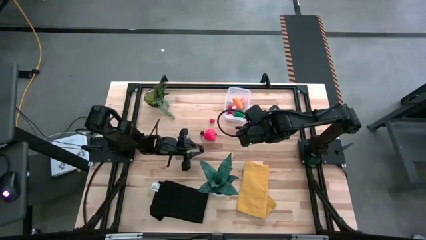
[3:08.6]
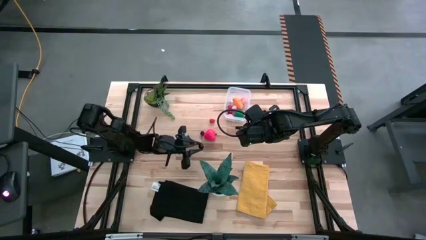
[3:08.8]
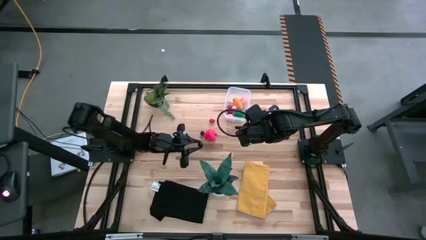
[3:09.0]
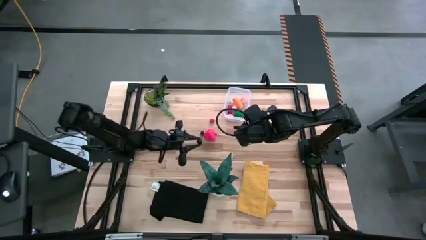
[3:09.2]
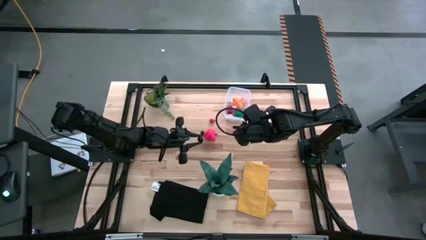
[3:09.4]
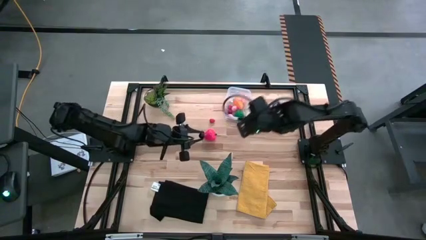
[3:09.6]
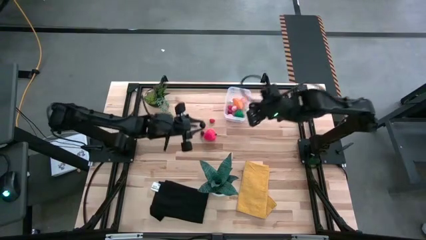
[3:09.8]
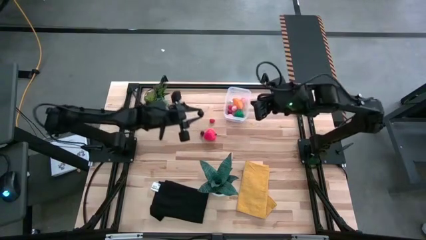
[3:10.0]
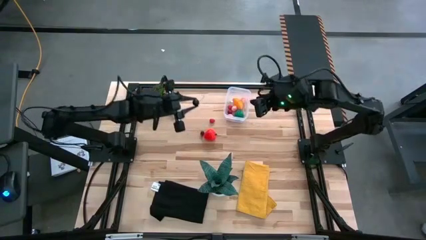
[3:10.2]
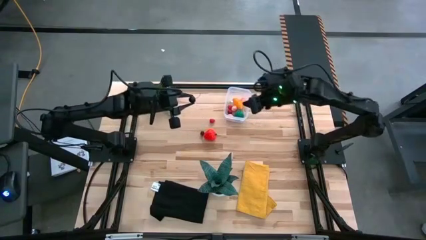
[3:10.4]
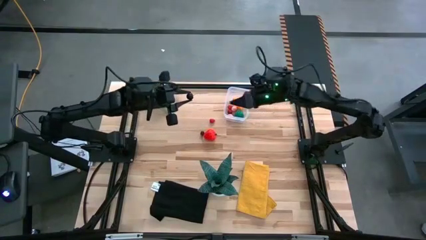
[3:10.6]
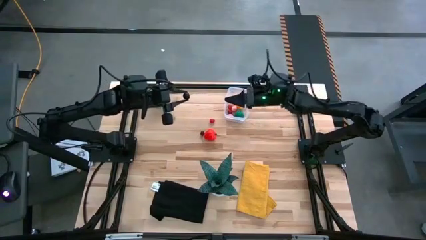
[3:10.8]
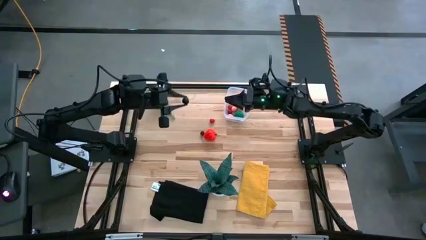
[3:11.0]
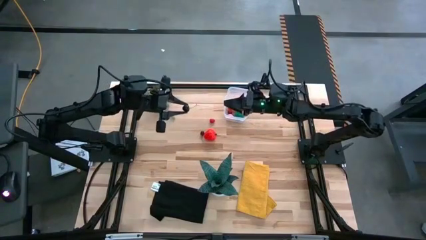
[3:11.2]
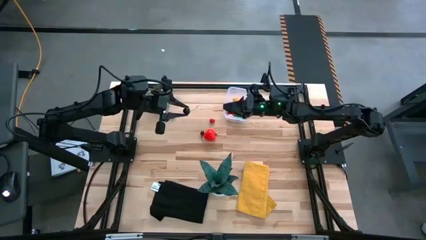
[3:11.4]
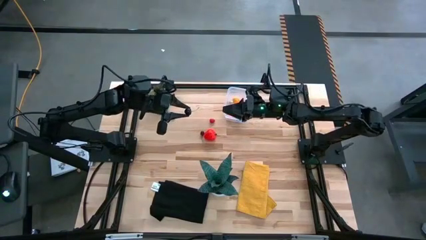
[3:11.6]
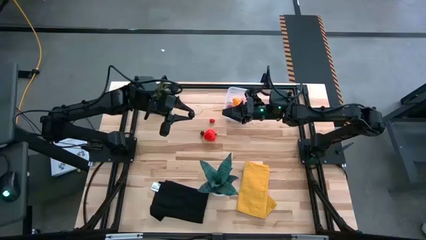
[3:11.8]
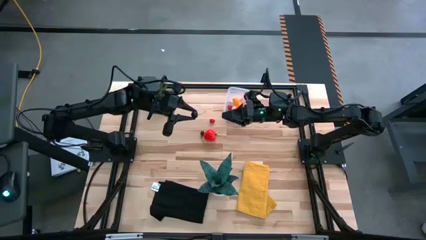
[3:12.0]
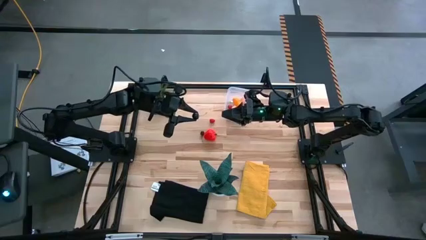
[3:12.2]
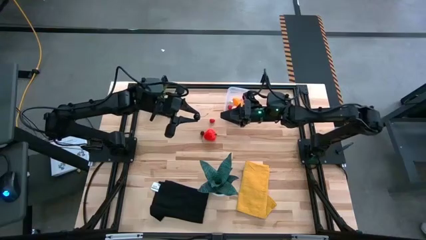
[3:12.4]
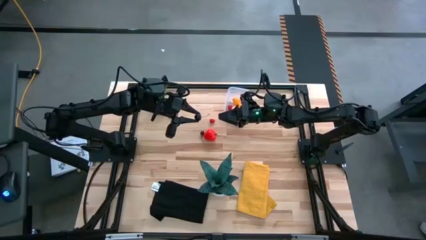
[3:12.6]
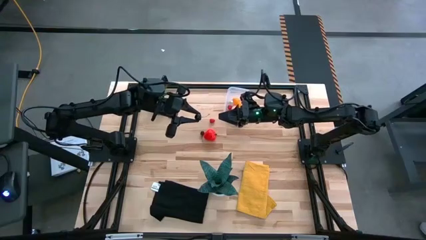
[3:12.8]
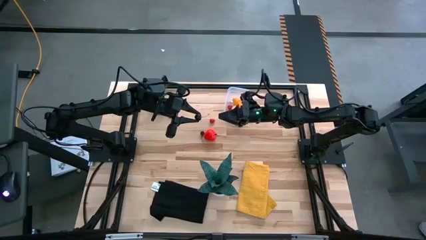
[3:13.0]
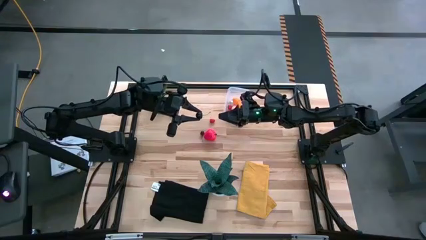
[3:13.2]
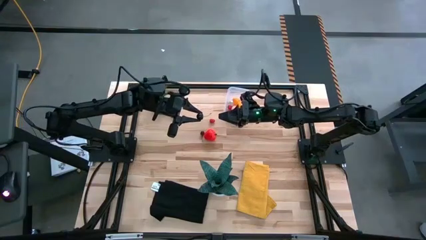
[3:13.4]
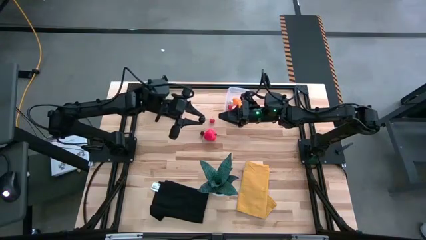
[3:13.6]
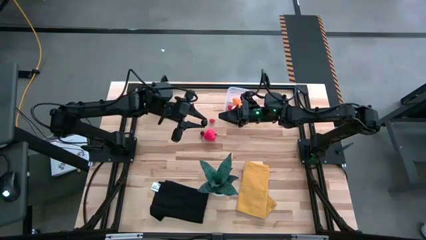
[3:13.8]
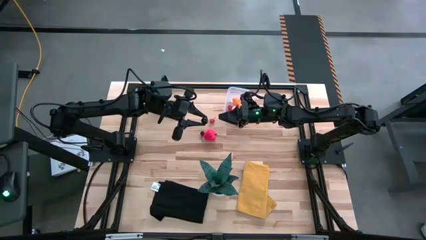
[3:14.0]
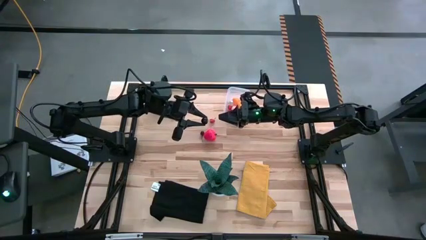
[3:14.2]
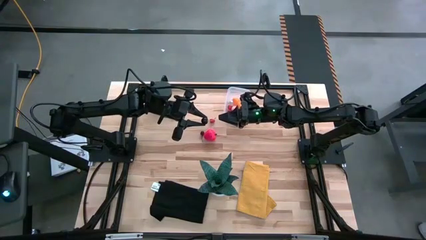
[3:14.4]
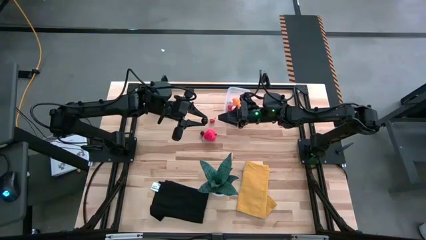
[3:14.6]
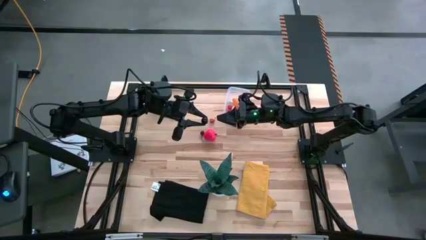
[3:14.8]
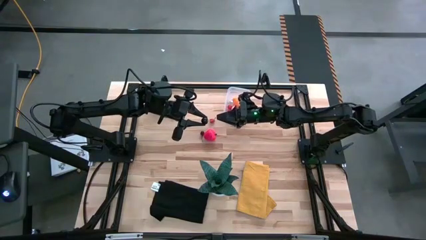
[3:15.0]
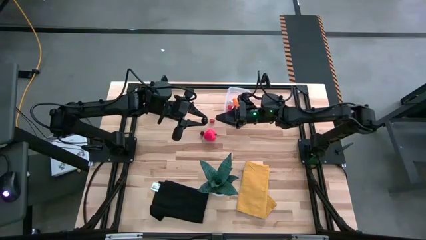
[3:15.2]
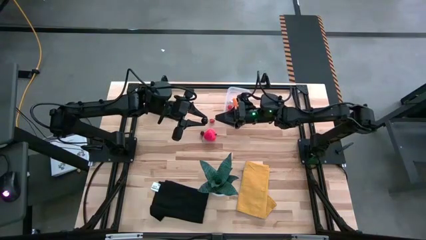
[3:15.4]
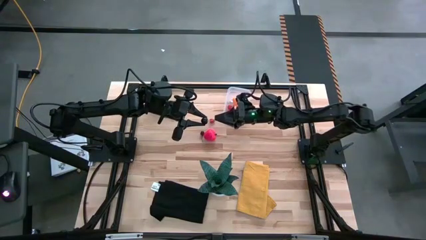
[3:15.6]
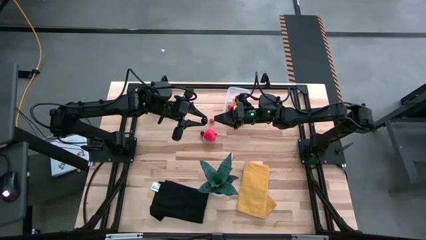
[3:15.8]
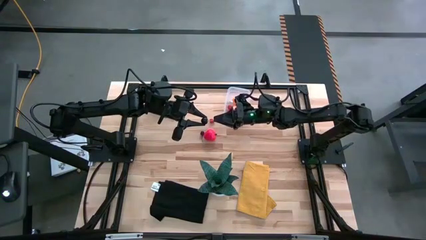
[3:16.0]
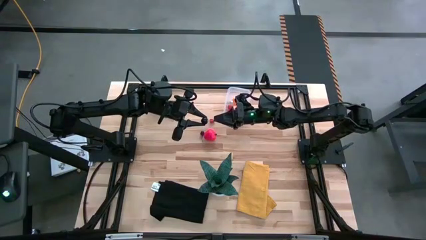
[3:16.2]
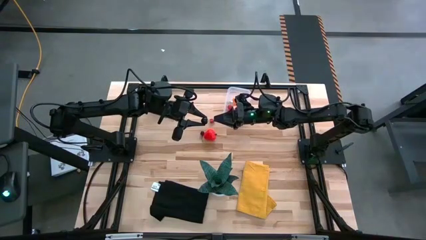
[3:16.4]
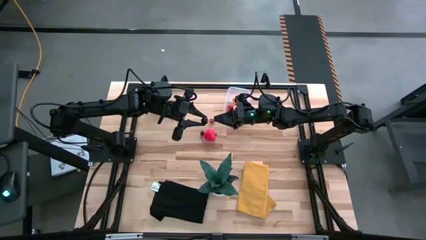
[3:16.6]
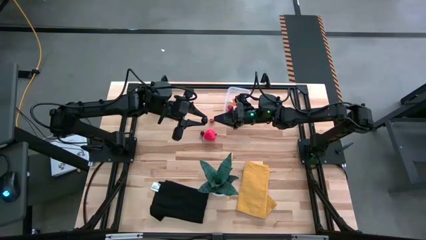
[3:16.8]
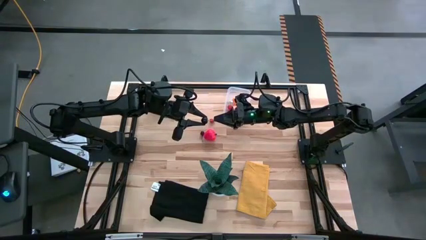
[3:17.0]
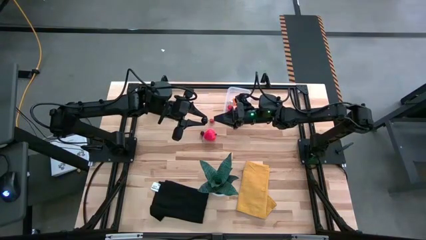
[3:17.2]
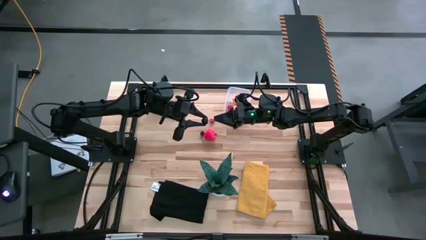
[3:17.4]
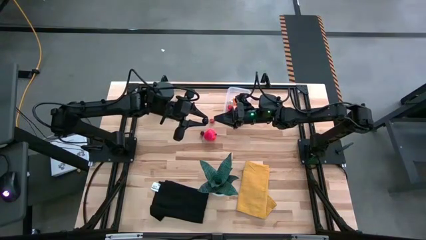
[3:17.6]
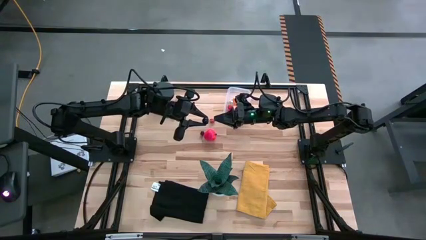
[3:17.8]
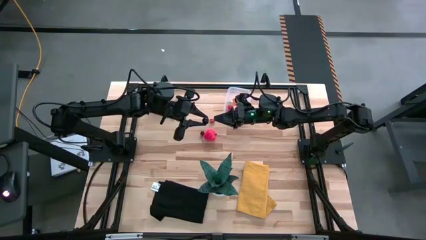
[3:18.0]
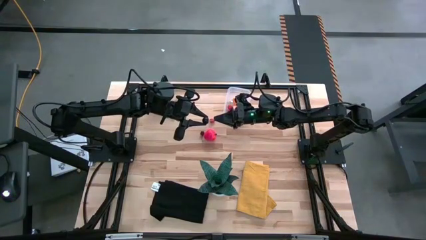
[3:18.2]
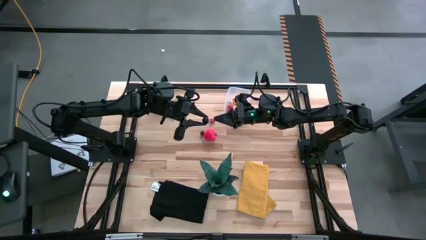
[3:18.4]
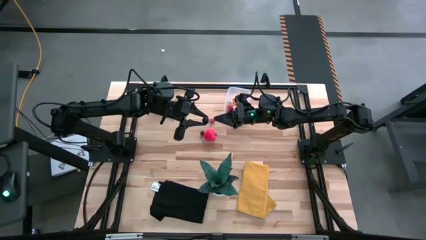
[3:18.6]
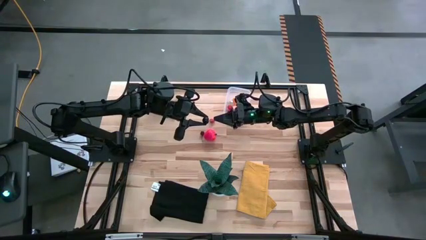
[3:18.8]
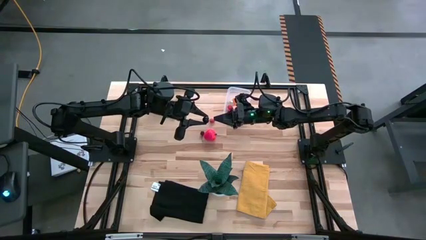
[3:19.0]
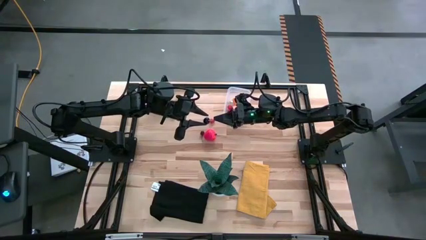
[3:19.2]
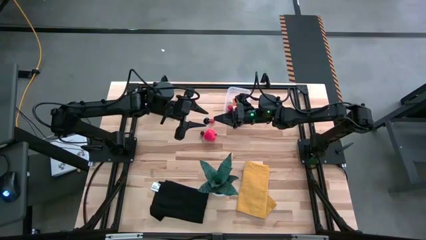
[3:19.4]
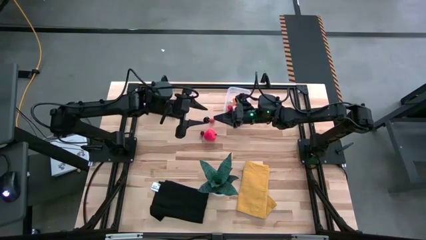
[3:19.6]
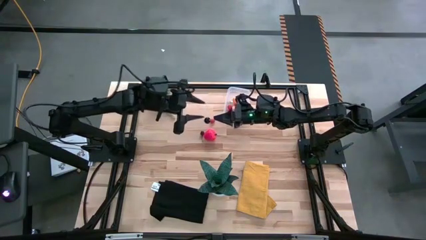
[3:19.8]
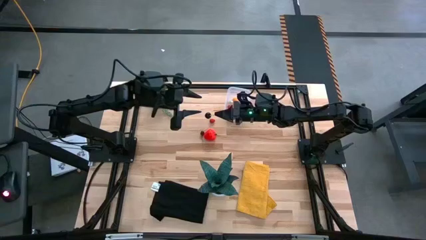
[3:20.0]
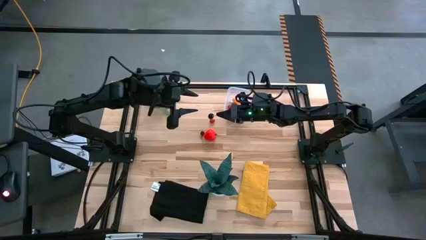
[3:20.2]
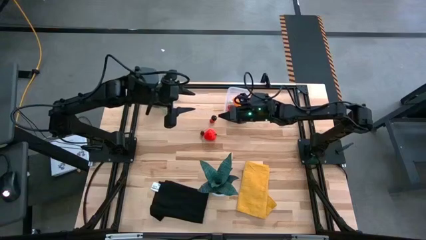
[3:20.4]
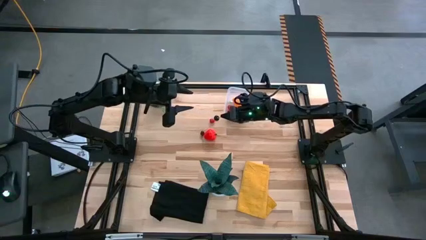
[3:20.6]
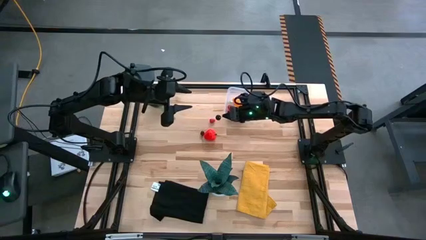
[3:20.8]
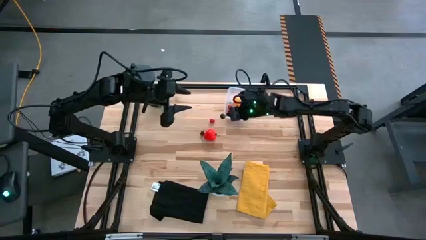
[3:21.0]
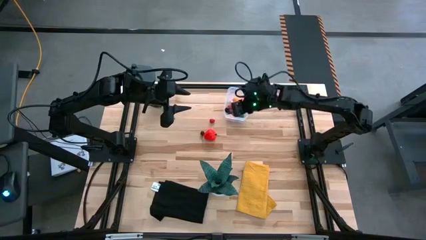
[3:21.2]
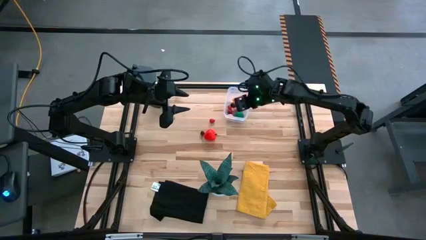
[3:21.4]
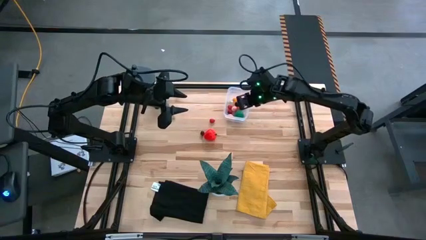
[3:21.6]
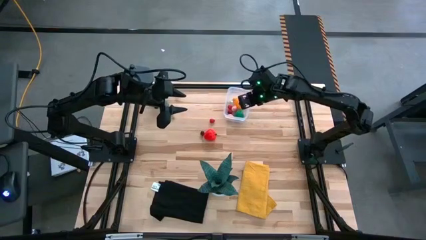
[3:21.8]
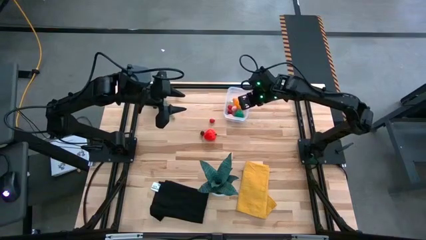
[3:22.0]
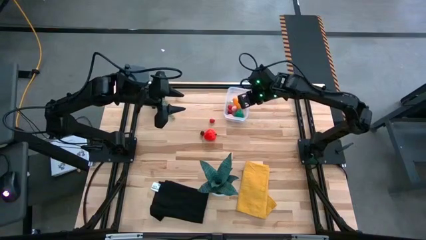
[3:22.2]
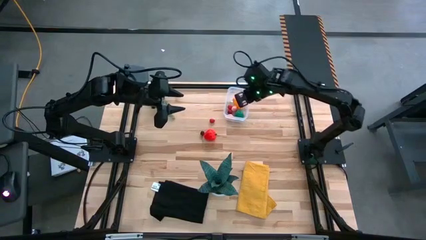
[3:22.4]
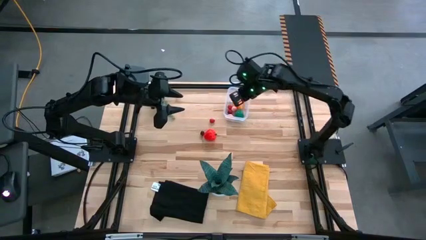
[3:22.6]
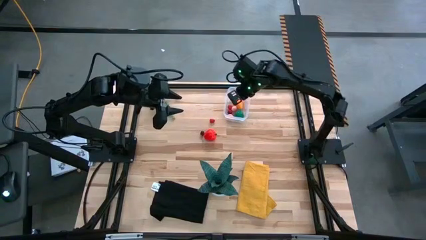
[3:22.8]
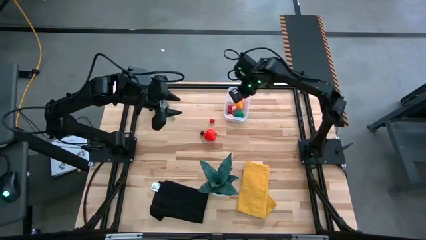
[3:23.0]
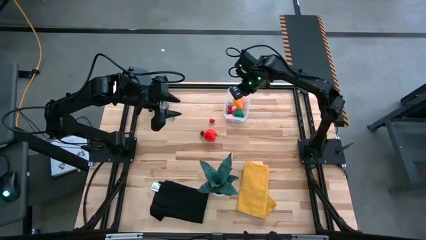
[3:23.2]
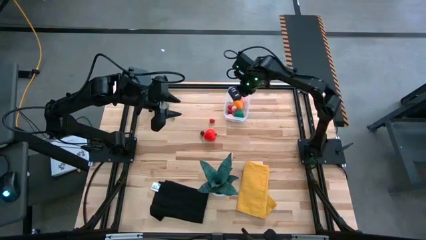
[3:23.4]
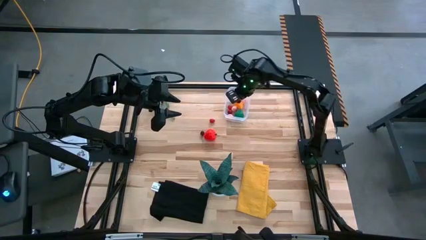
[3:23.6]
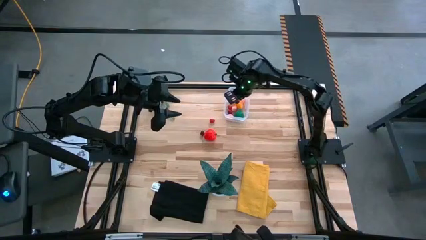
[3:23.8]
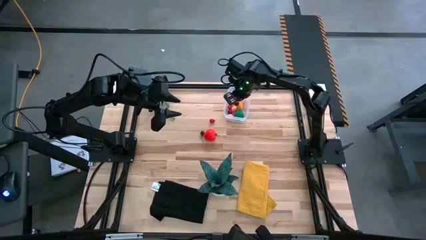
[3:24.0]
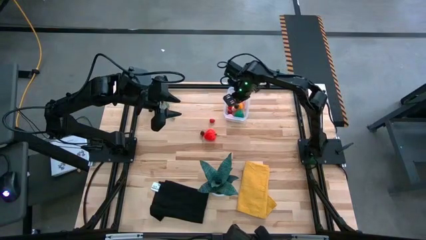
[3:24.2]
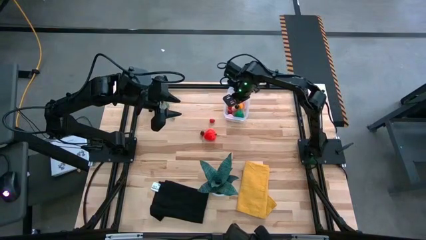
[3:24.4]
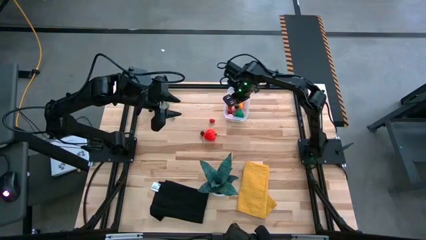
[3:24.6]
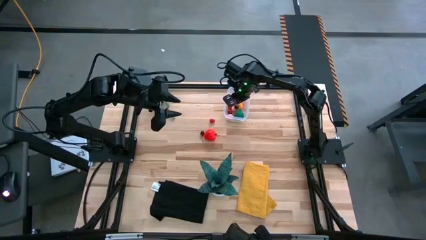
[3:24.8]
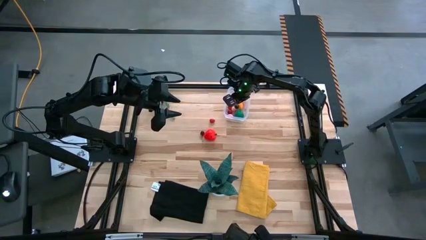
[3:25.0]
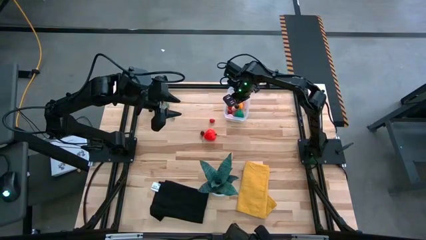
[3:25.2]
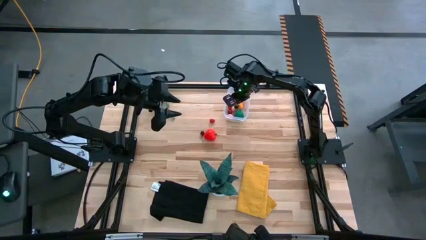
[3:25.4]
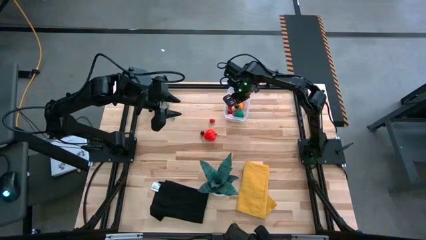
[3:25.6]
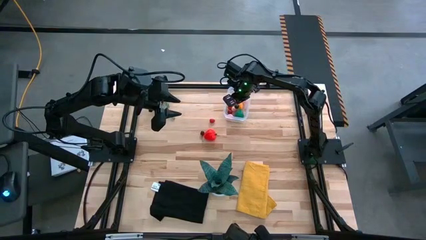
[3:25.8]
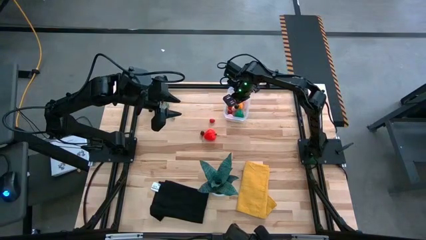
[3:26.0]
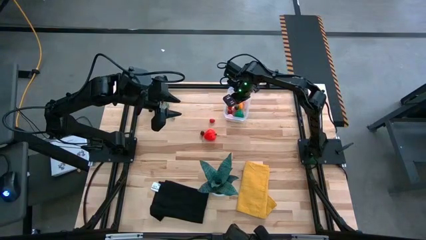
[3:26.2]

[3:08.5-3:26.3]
Task: Pick and placing Produce into tupperware
Put the black cherry into the transparent container
